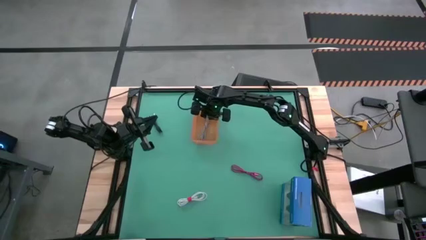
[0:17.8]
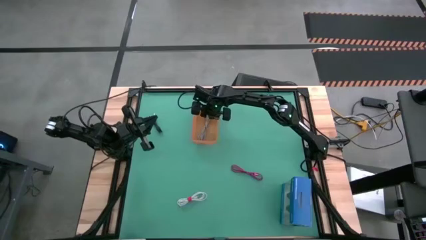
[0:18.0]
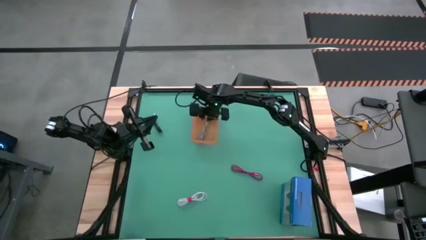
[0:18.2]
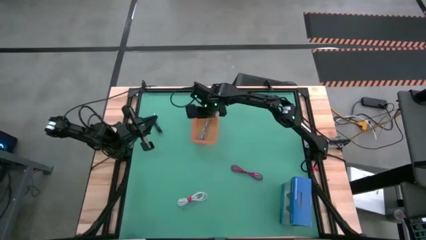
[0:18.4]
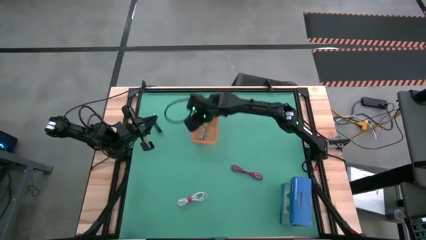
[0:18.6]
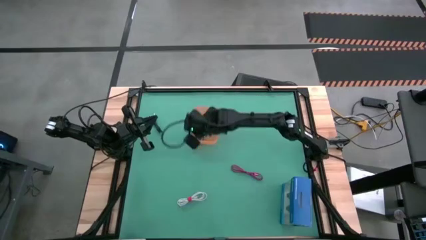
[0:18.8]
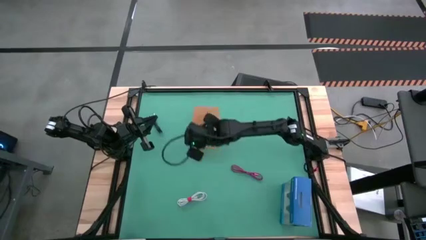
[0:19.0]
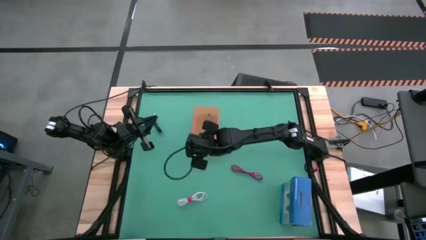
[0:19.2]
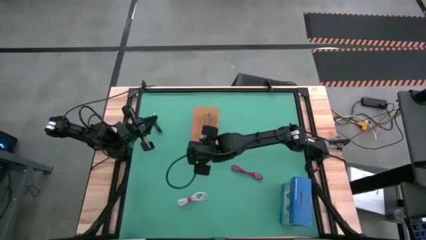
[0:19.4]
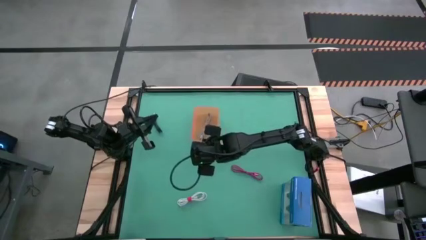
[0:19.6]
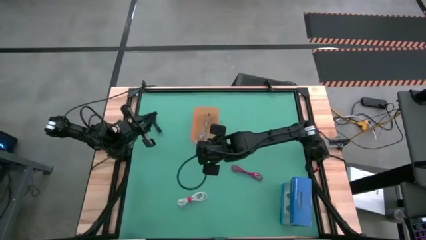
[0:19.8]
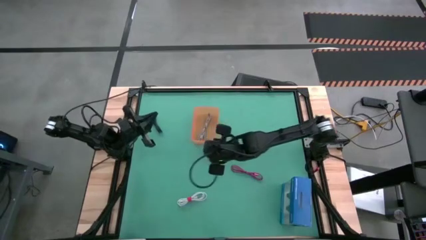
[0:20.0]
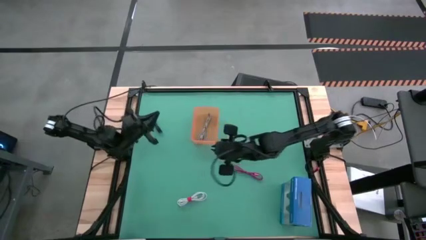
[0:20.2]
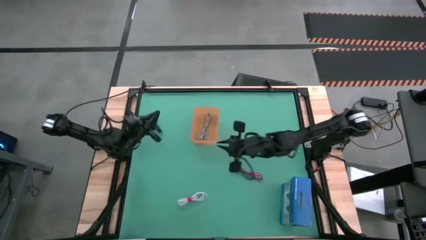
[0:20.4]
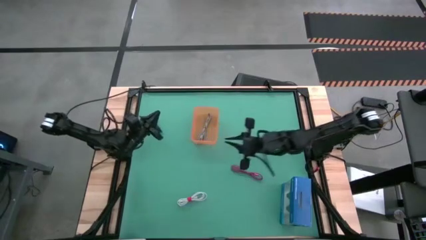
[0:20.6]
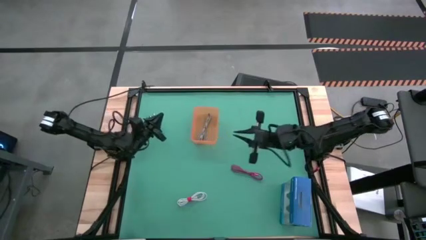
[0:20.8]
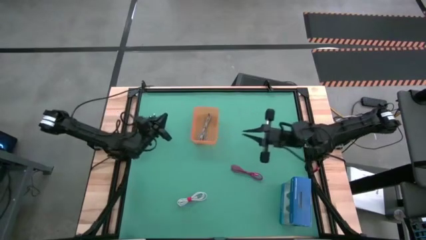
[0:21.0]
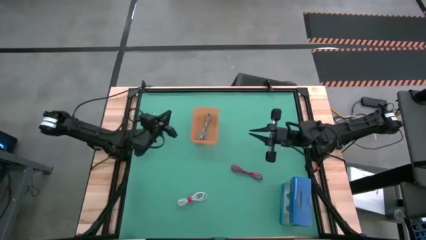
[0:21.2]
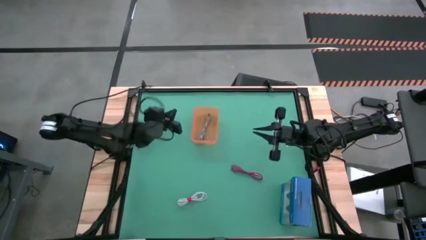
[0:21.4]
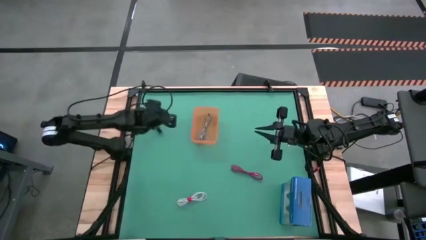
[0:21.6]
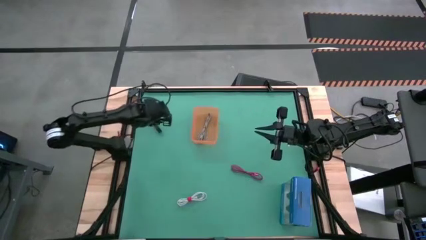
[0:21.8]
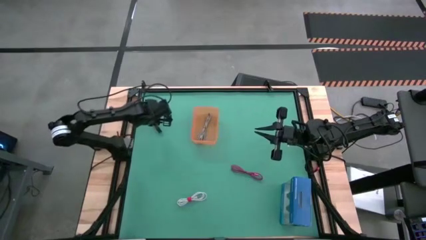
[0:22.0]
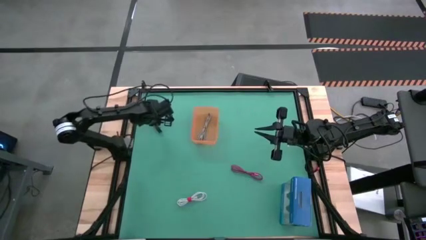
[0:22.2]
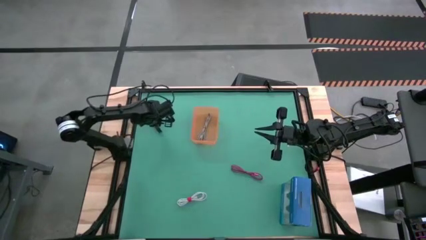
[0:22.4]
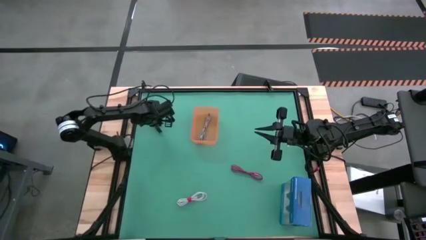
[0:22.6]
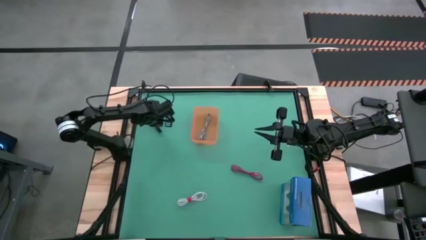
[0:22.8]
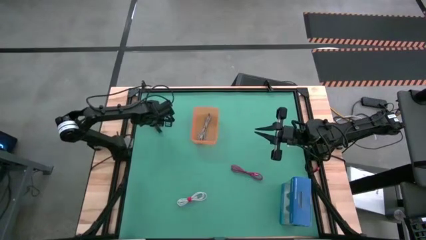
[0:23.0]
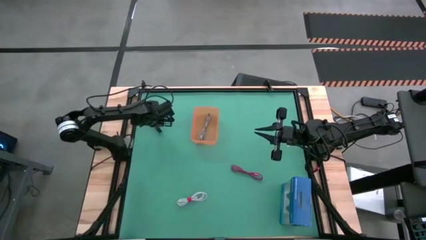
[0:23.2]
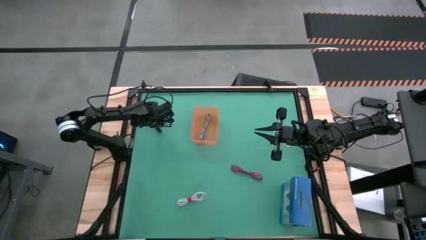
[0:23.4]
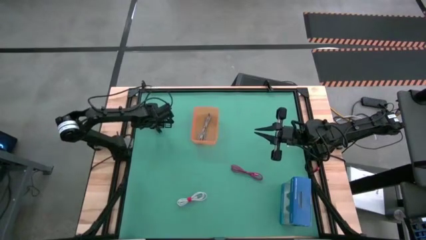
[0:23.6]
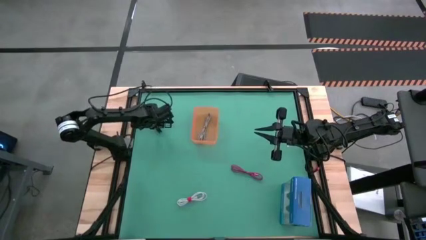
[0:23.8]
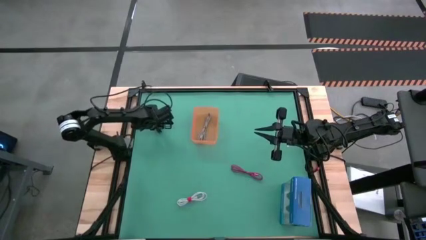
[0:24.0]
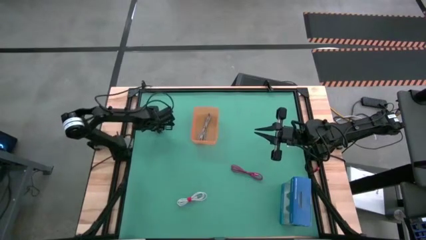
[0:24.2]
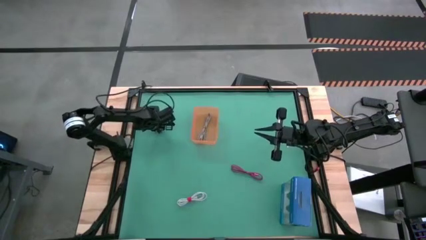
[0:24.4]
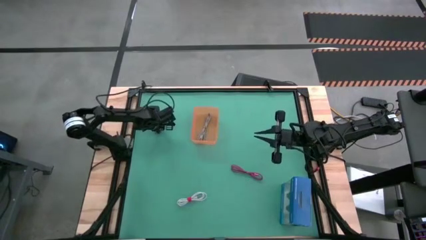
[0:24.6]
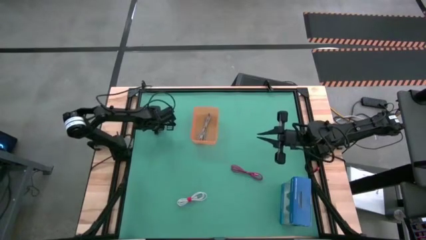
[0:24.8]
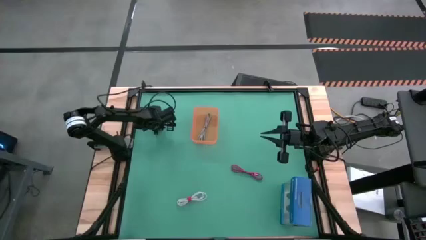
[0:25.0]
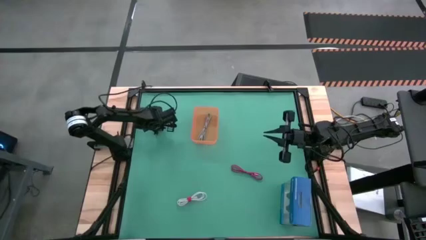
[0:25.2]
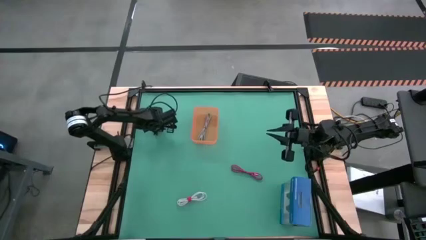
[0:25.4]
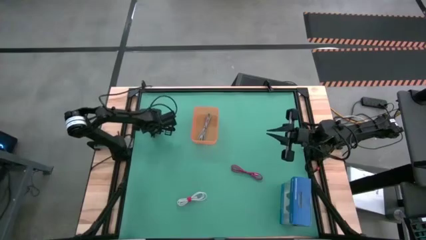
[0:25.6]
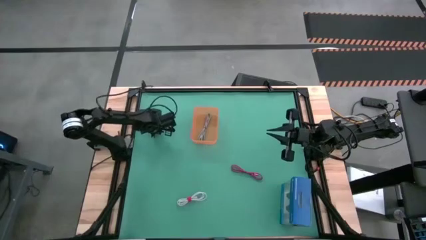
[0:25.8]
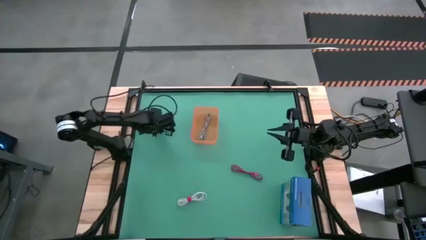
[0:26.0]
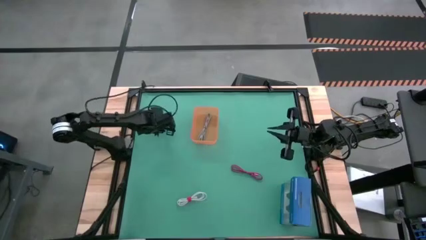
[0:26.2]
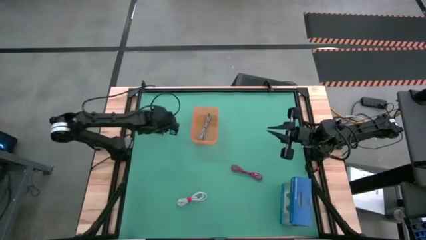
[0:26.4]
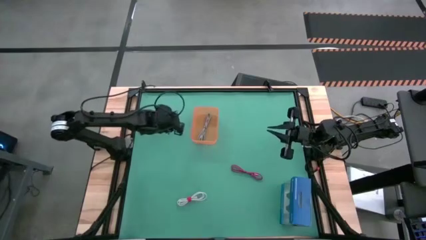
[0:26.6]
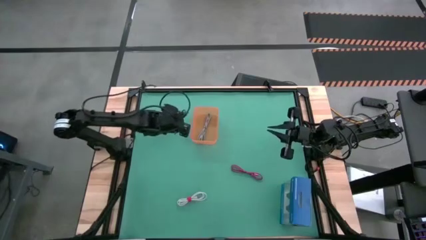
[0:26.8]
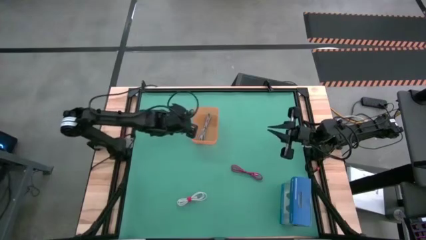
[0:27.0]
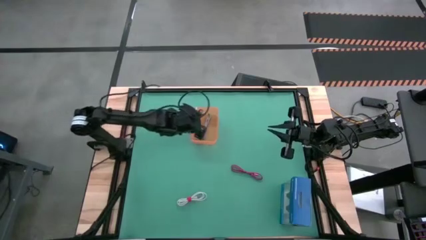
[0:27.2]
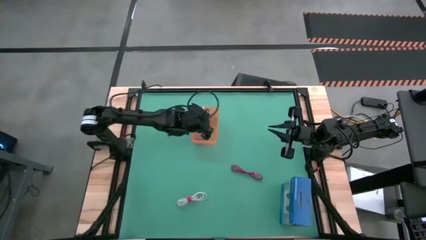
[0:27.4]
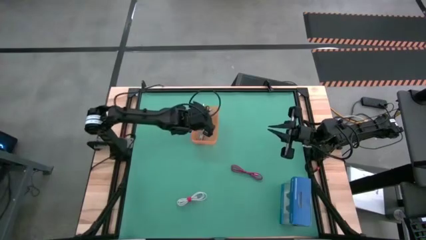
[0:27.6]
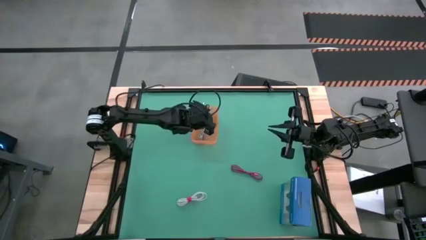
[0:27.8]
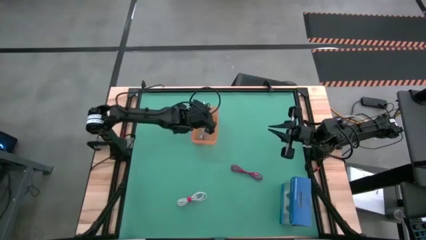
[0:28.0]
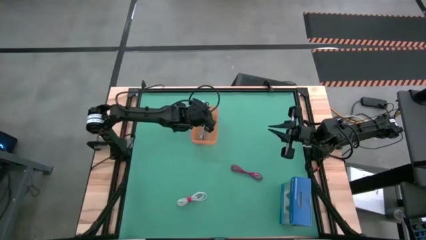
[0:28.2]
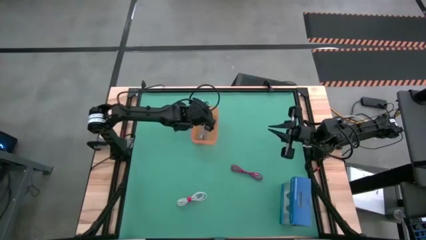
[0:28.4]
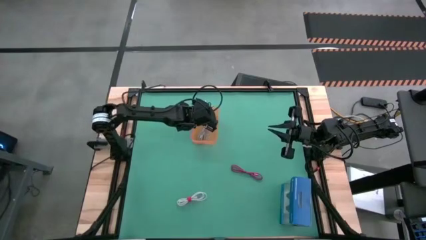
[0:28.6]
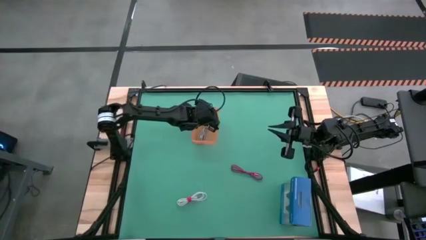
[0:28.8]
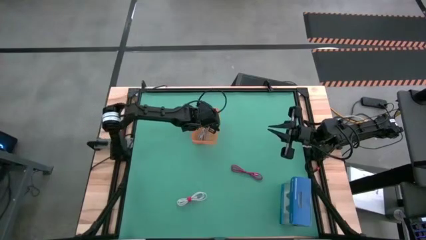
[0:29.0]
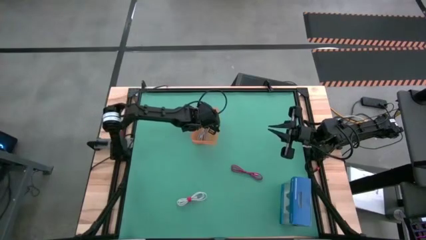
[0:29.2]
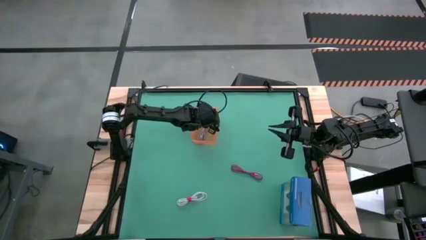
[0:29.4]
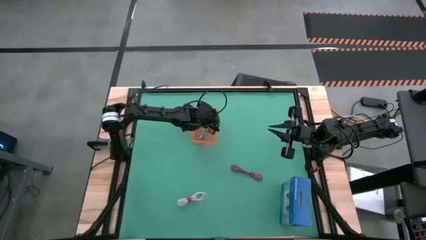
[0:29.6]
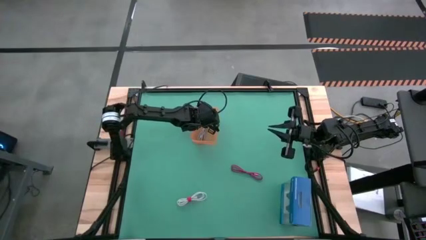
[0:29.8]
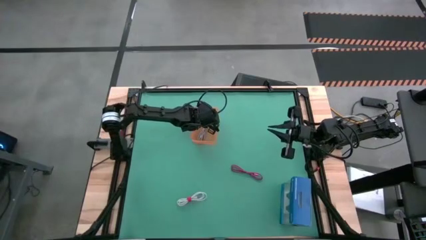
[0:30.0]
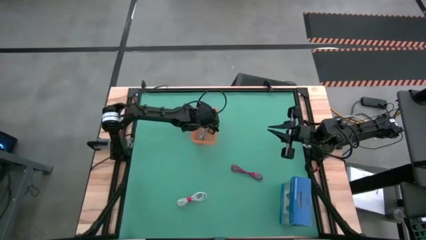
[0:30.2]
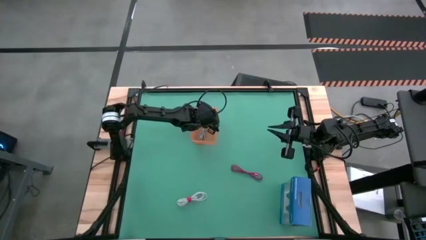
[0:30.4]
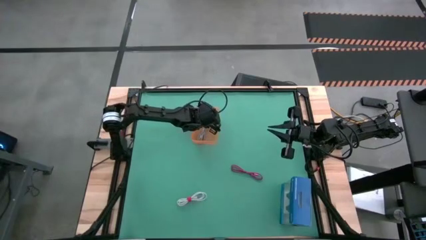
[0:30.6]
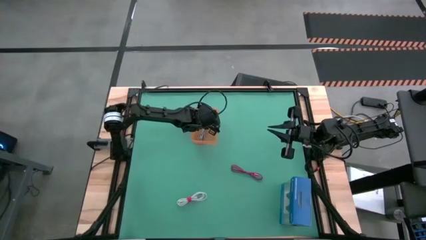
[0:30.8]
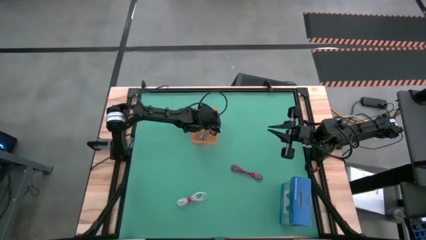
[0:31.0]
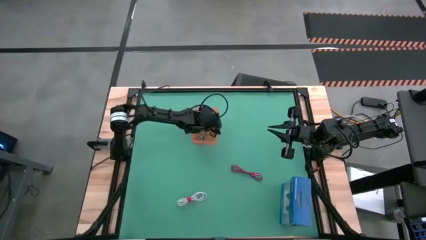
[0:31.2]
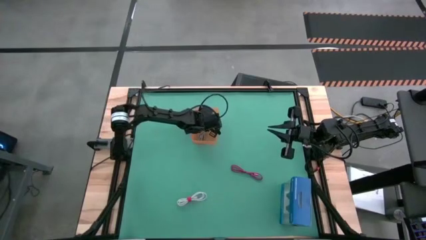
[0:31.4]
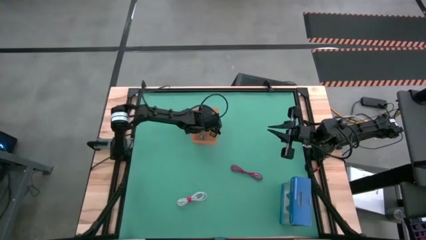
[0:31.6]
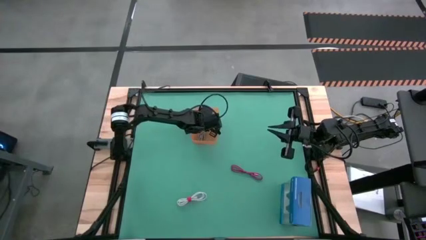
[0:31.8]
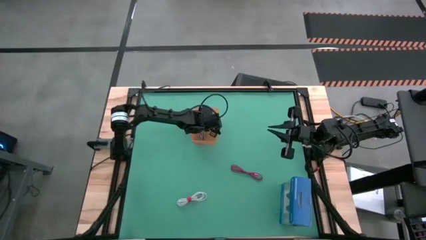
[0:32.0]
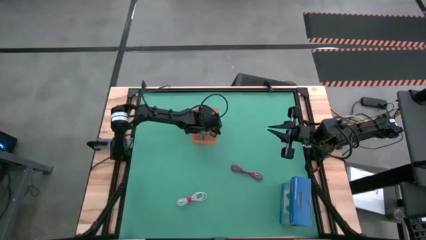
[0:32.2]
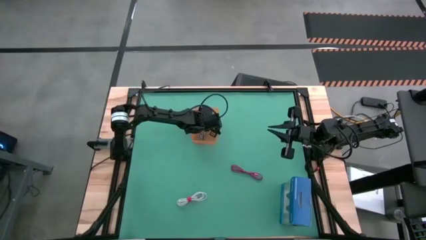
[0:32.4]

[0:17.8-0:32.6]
Task: Pick and place USB-C Cables
Put the black charger cable into the orange bin
